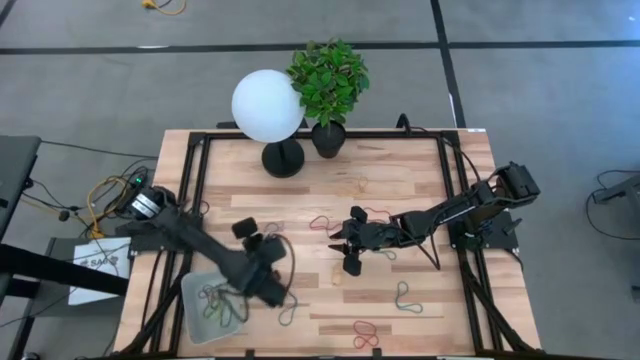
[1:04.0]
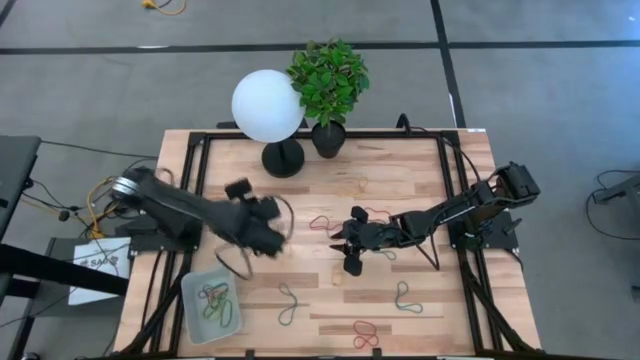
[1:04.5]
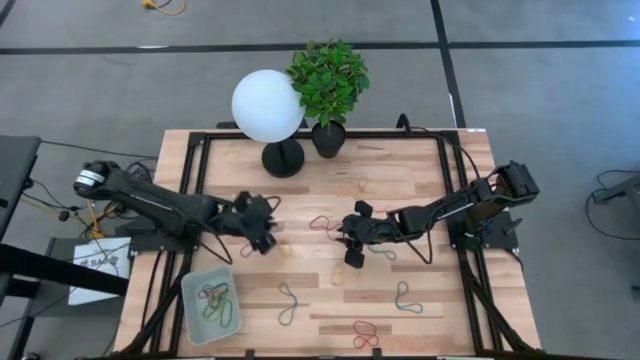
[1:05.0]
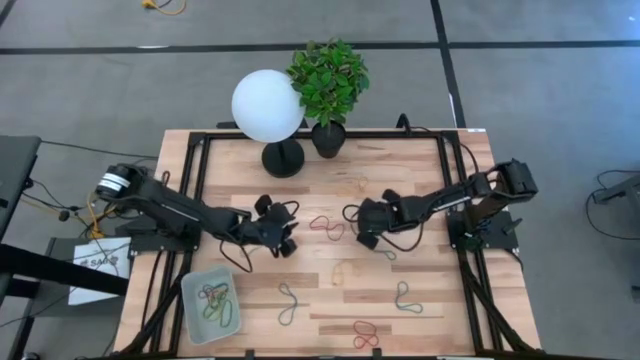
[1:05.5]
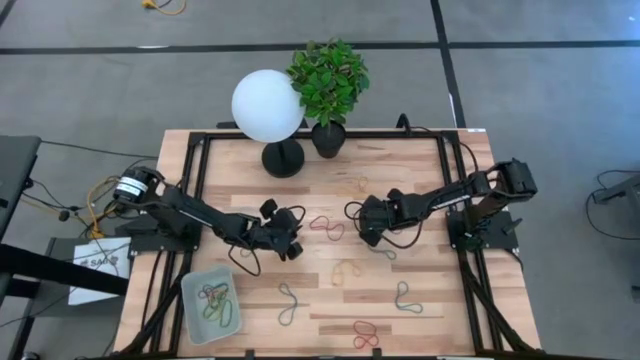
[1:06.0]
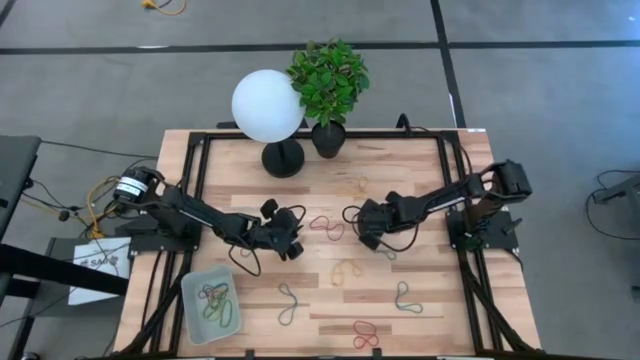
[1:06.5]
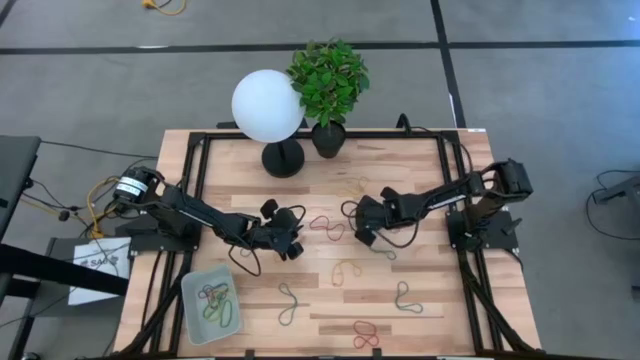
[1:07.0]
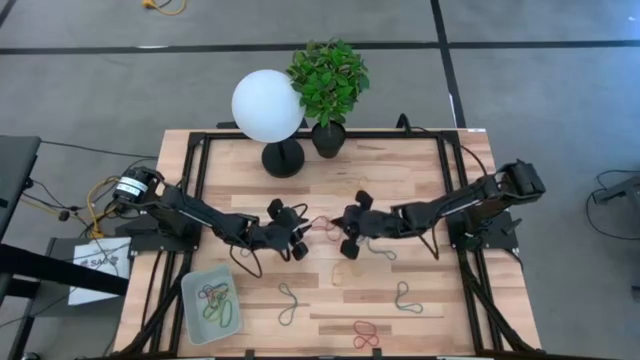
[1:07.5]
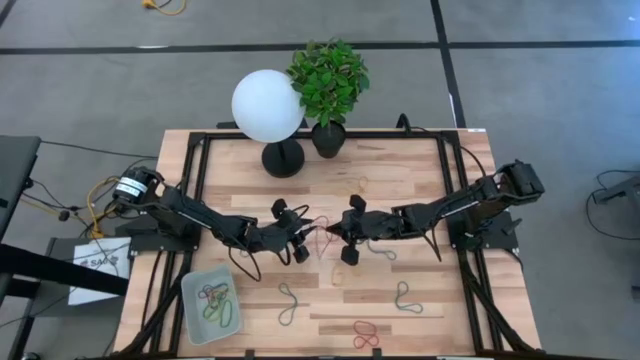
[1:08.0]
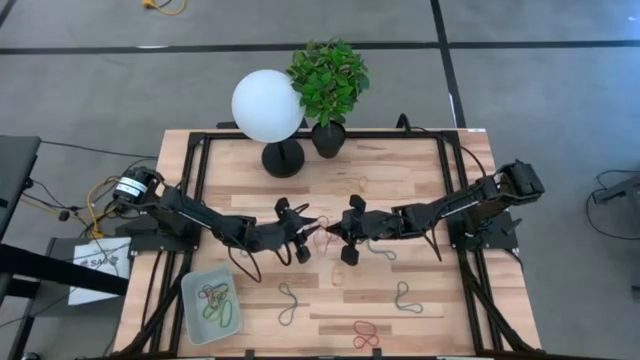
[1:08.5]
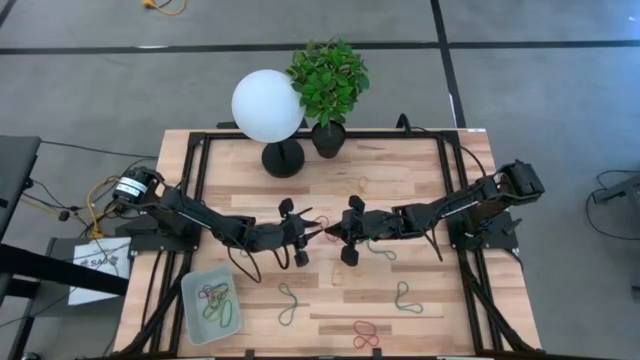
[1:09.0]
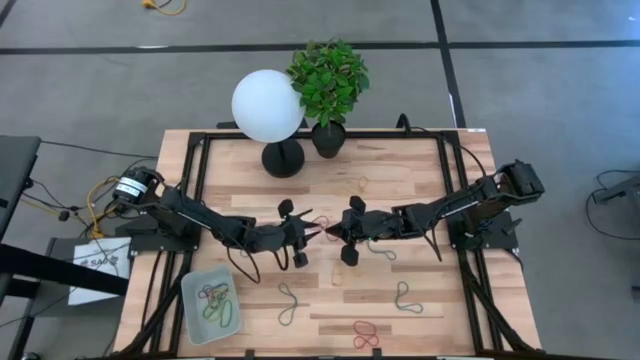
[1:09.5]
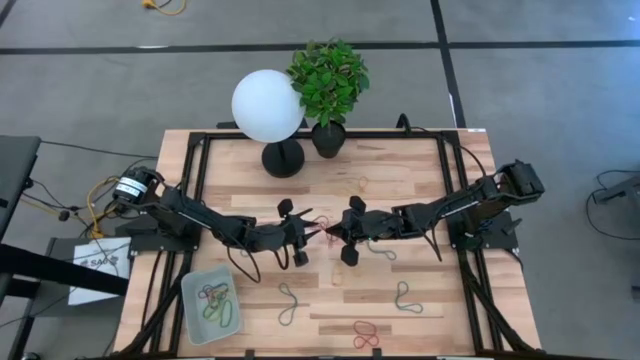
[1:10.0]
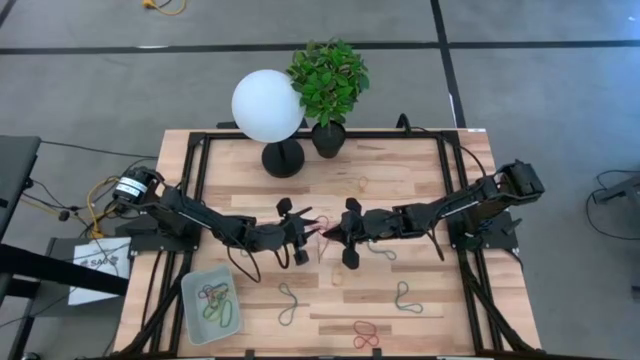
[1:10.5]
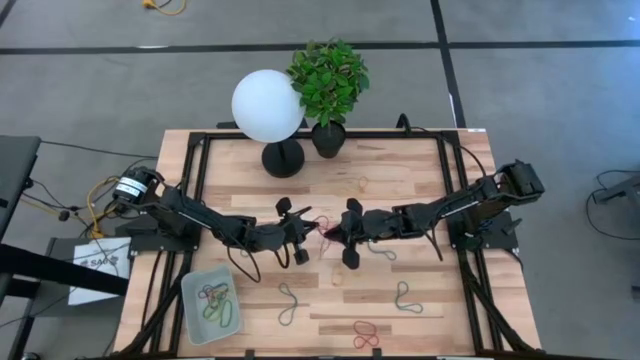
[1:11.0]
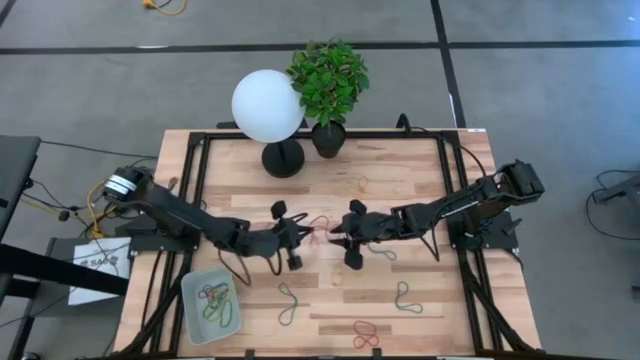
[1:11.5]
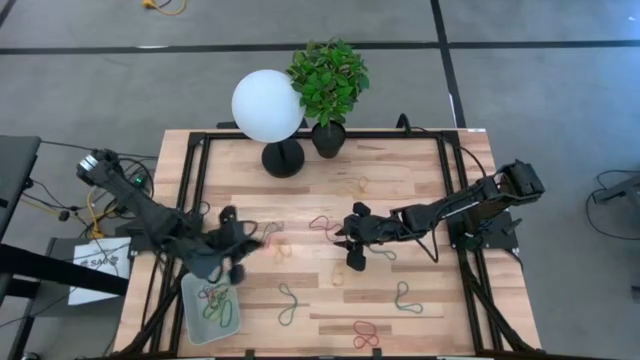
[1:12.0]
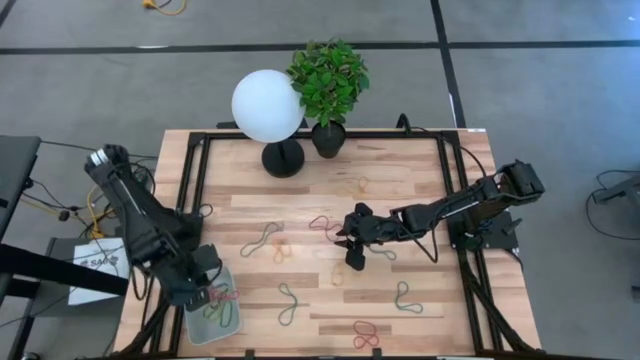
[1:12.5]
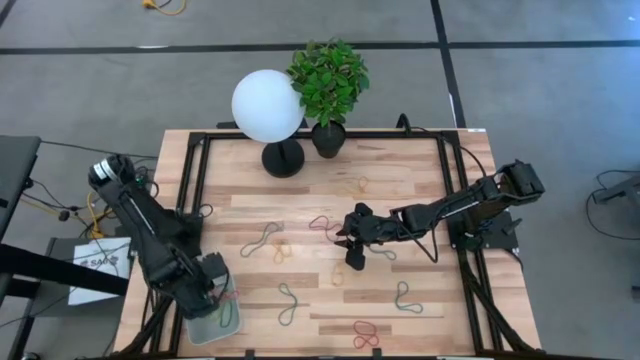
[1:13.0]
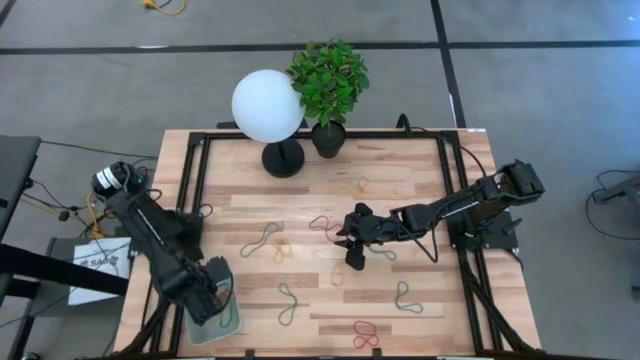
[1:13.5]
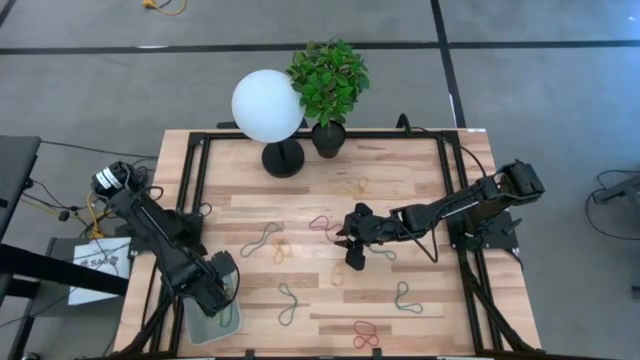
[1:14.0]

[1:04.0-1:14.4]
Task: Pick and place items into bin
Put the red rubber band into the gray bin

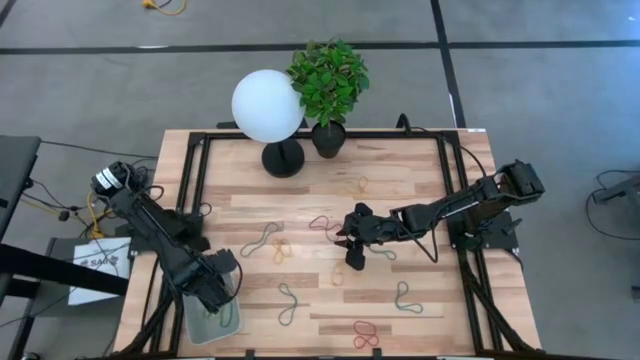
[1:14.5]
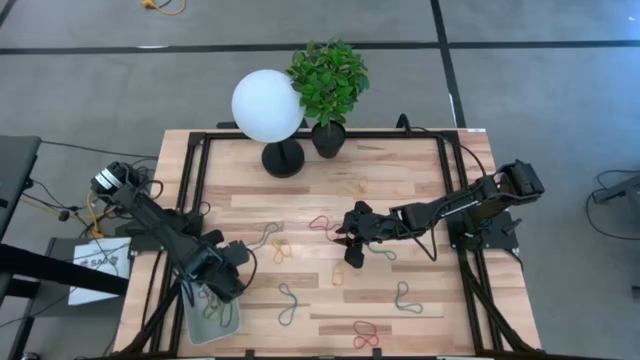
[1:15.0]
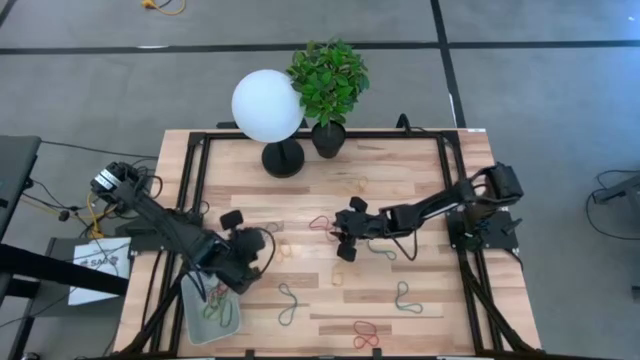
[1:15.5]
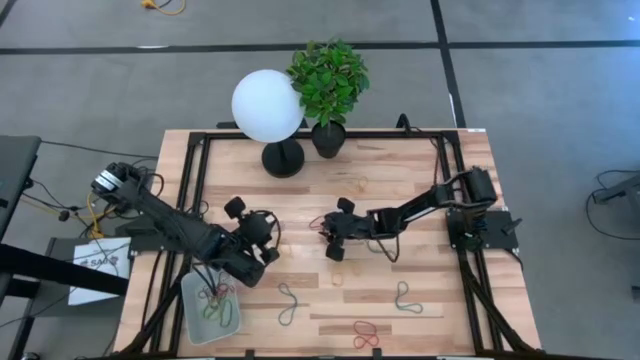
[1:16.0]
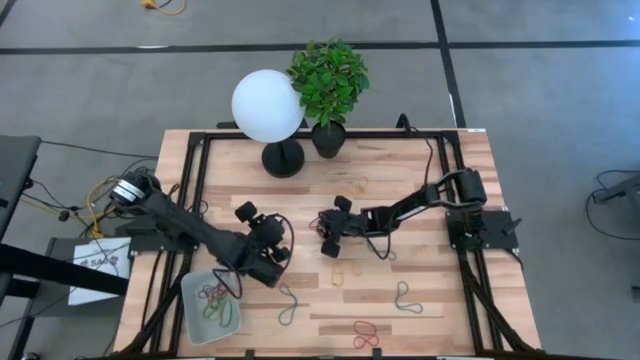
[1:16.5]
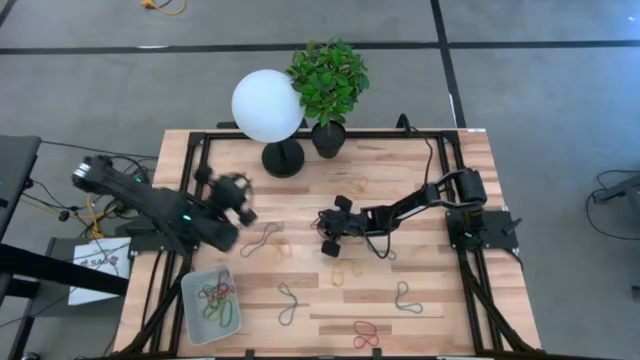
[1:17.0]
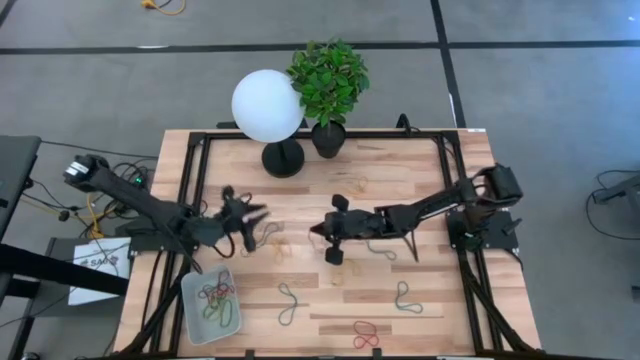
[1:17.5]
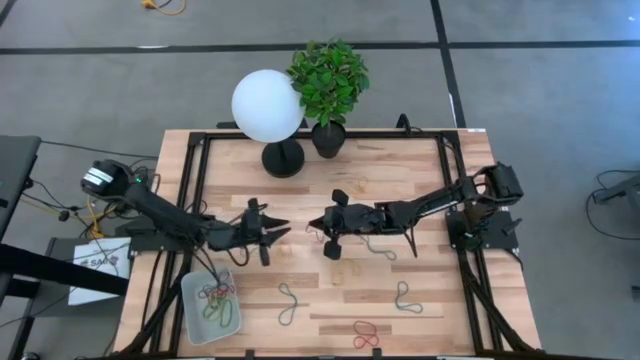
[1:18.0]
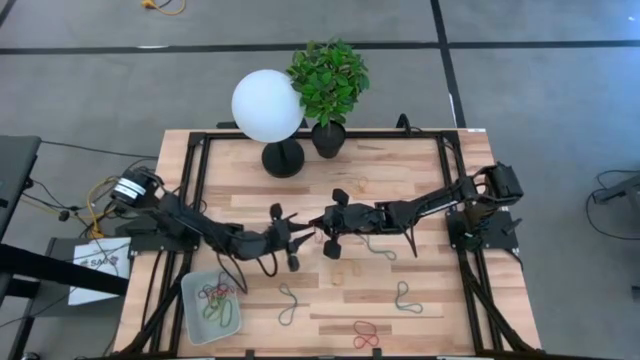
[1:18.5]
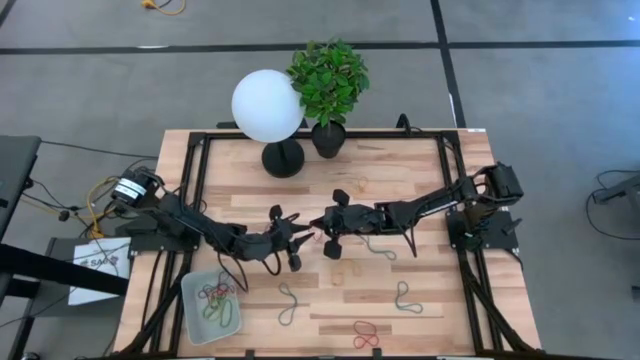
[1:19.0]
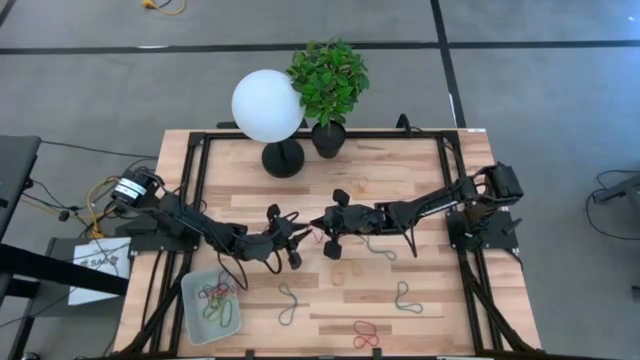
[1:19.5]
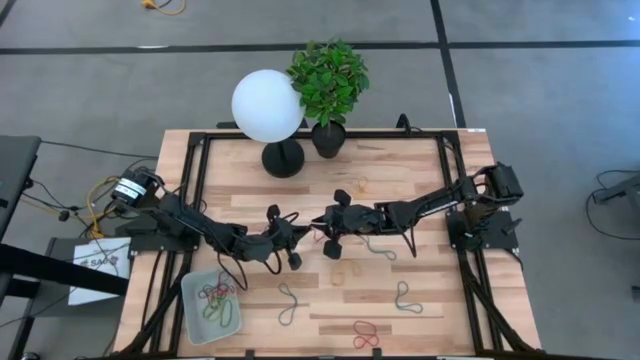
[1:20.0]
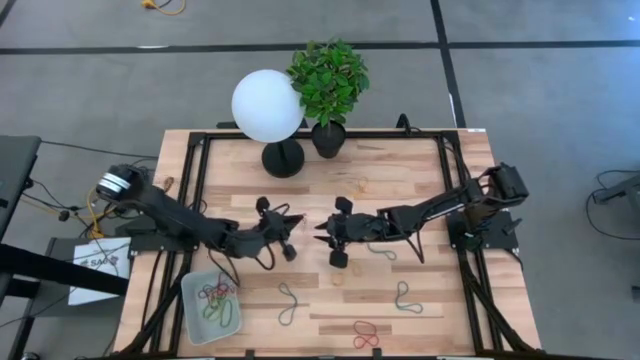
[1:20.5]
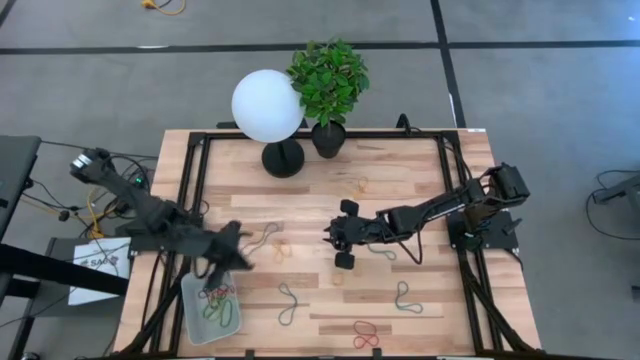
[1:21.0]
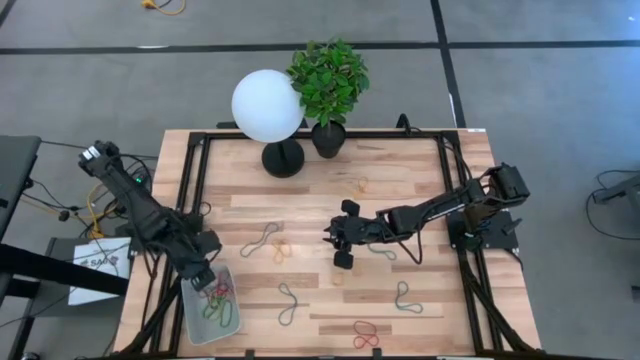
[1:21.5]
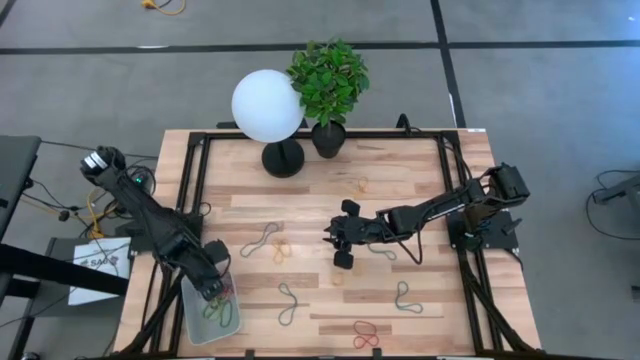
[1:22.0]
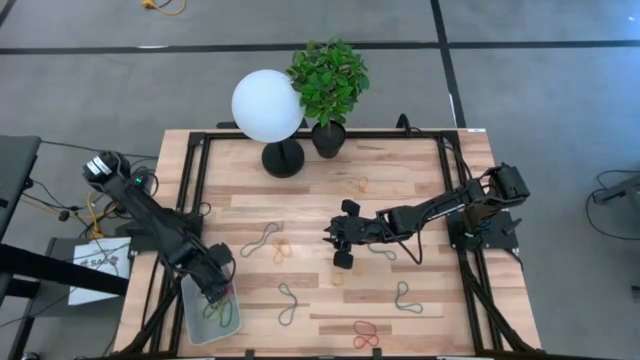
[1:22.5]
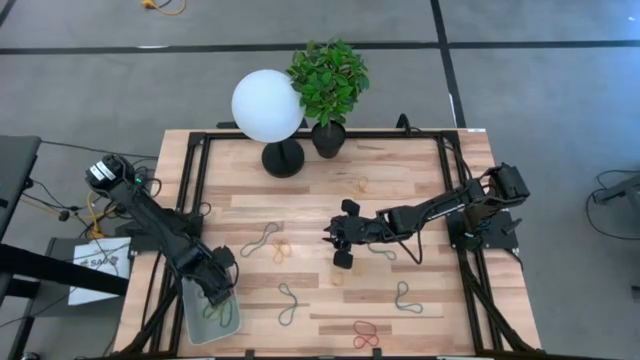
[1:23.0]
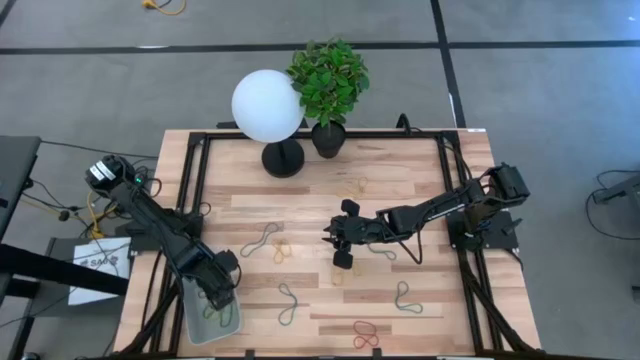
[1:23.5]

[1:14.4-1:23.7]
Put the red rubber band into the gray bin

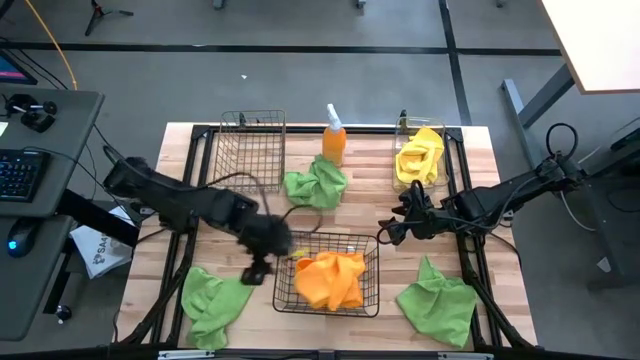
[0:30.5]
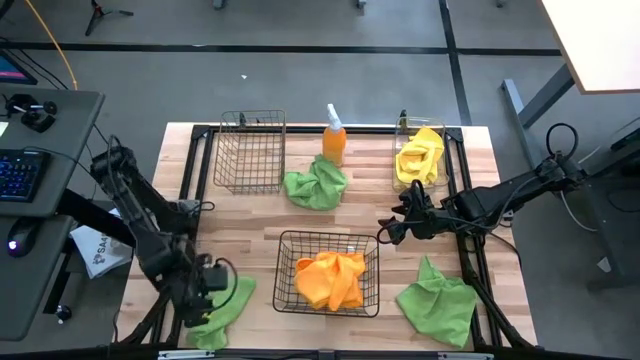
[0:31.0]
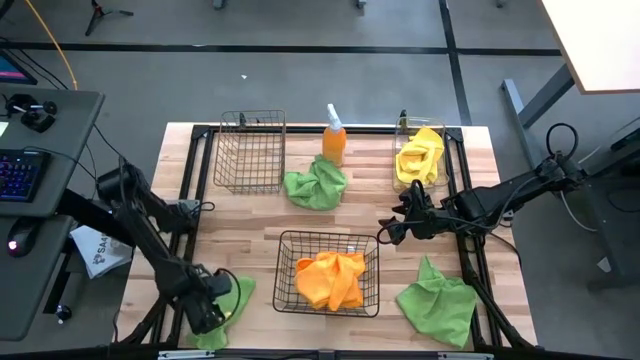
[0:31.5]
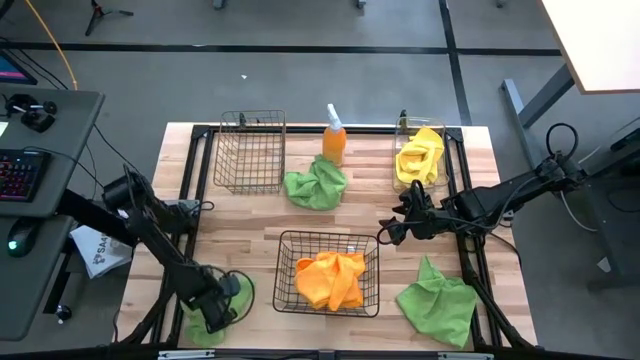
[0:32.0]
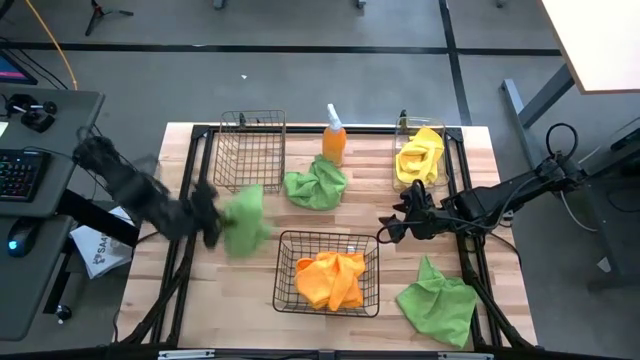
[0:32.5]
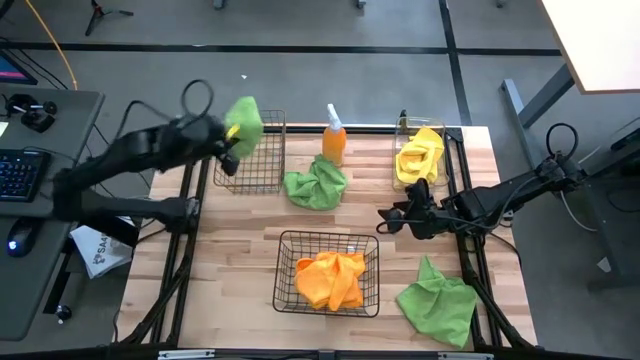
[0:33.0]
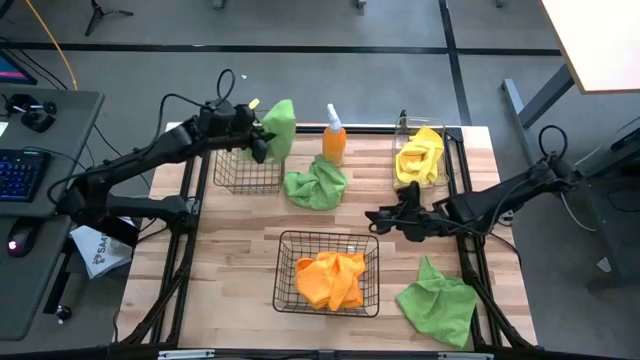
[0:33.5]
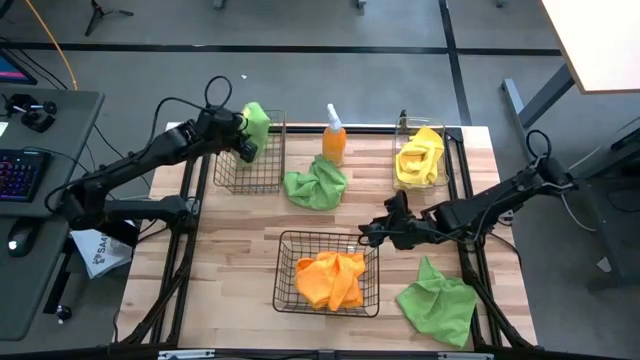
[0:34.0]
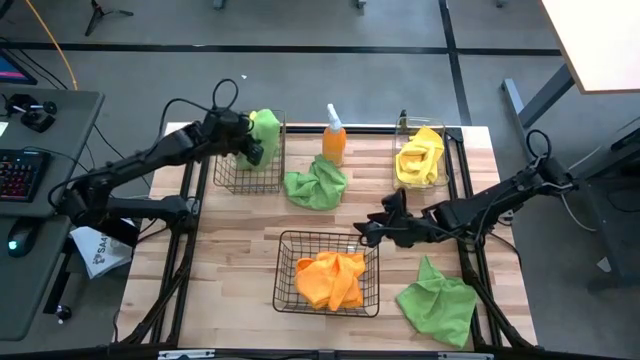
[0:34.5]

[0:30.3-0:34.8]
Task: Sort microfiber towel by color & place in baskets
Put the bottom left green microfiber towel into the gold wire basket
